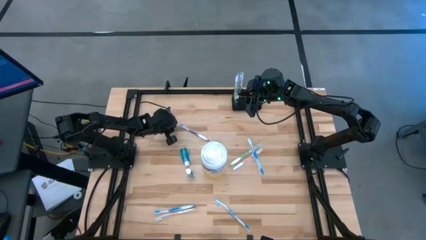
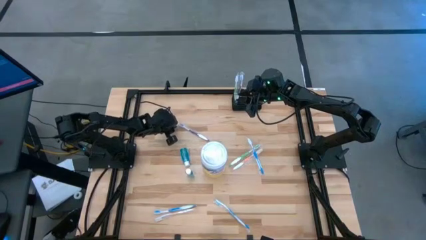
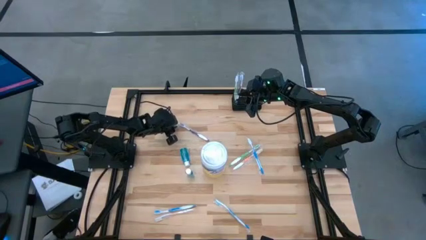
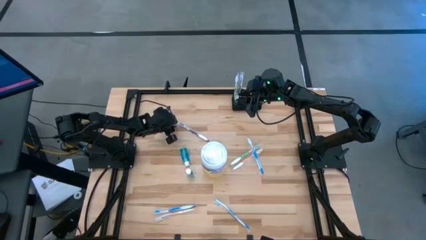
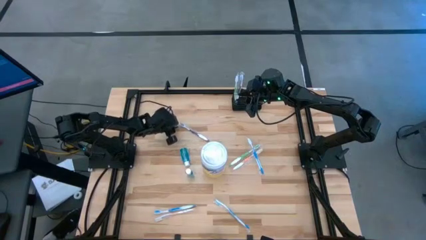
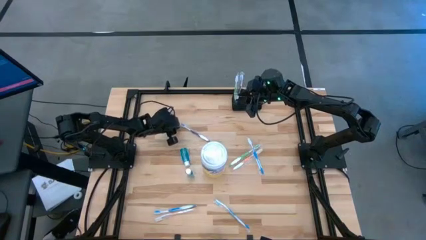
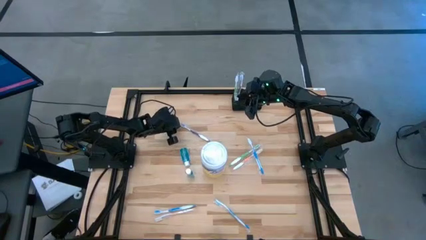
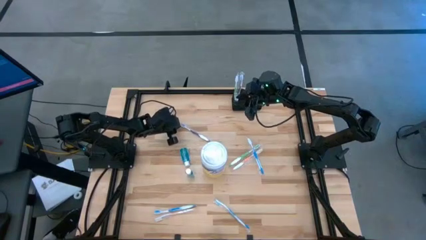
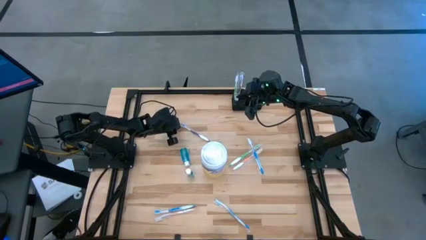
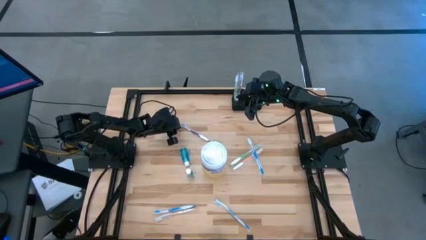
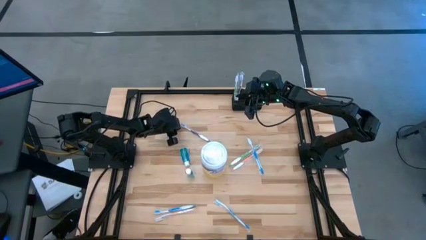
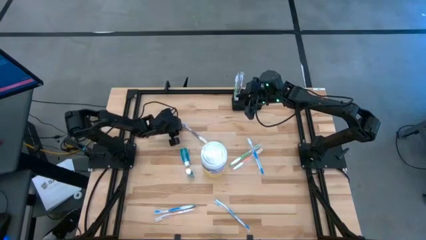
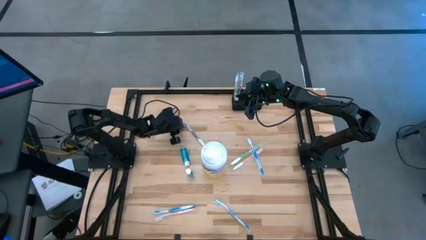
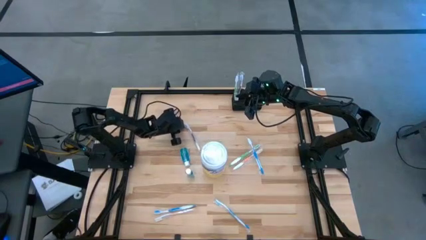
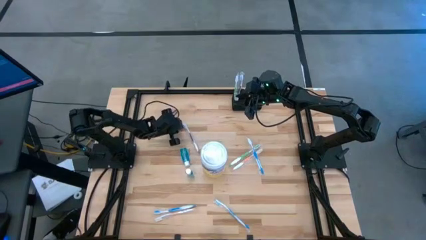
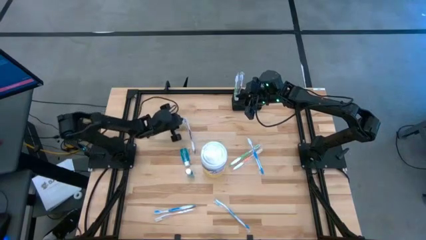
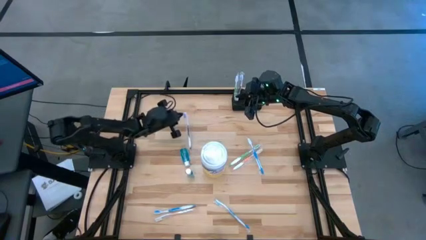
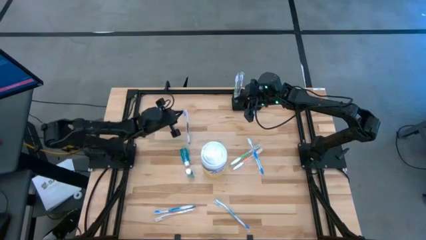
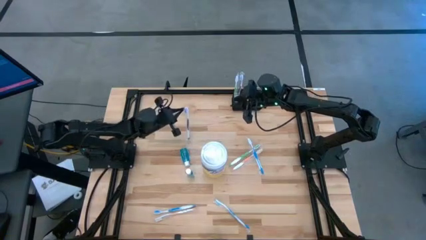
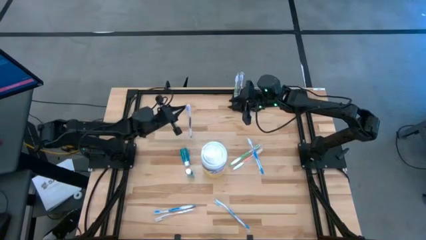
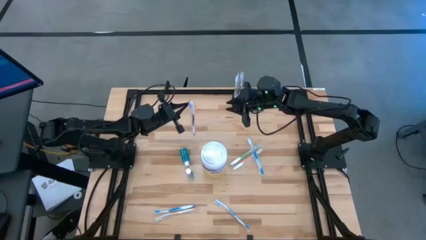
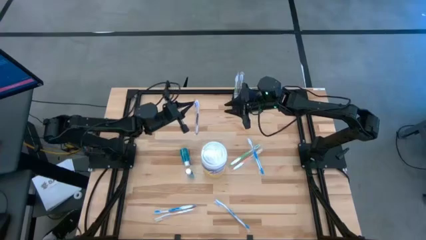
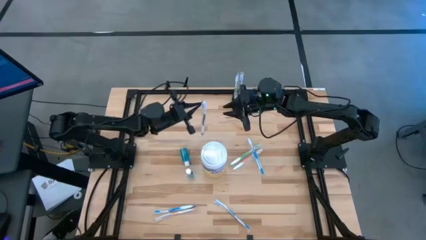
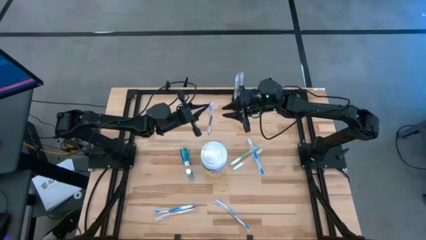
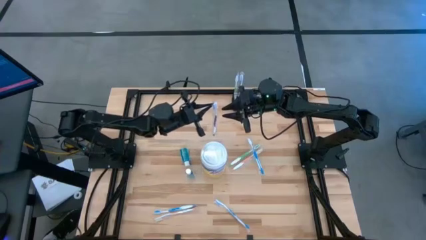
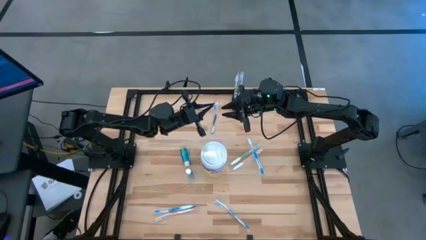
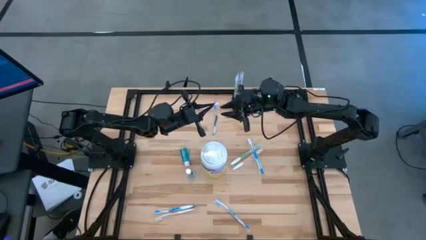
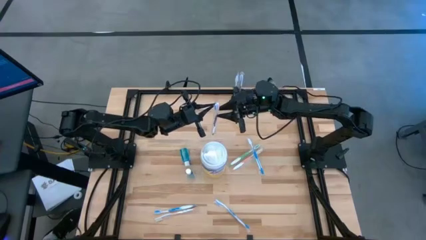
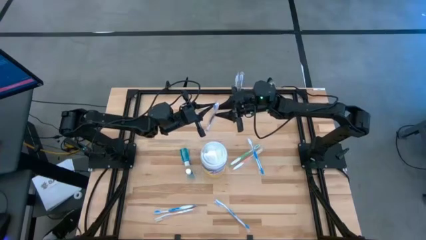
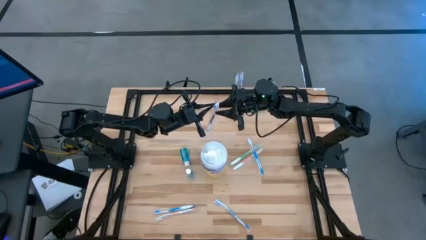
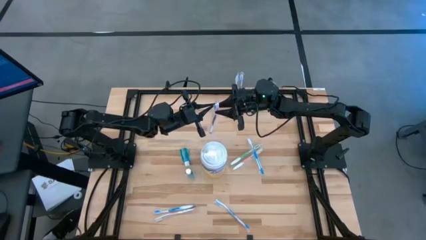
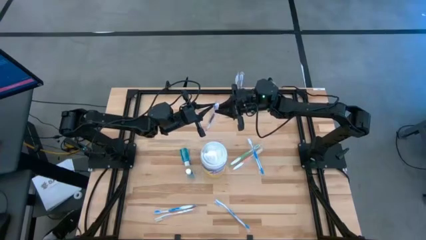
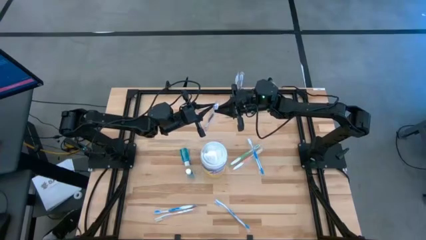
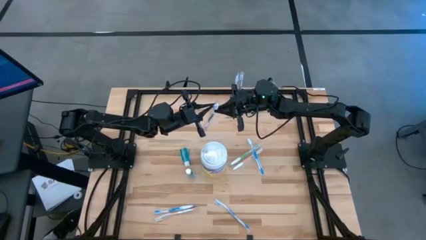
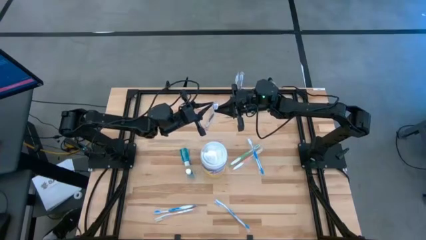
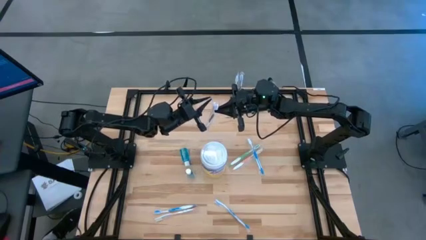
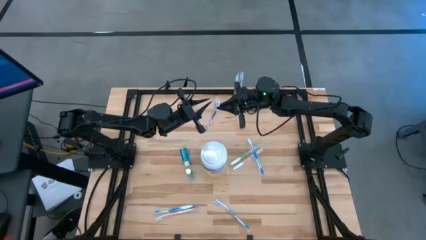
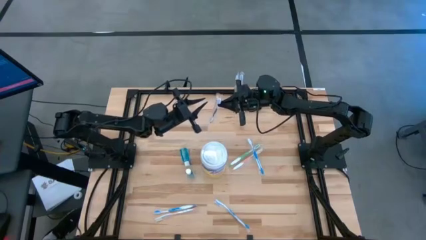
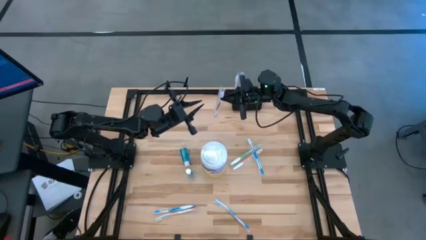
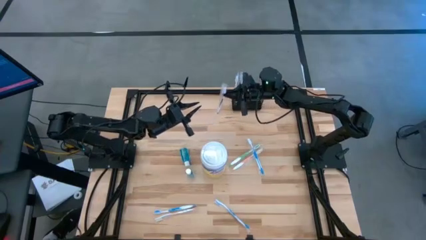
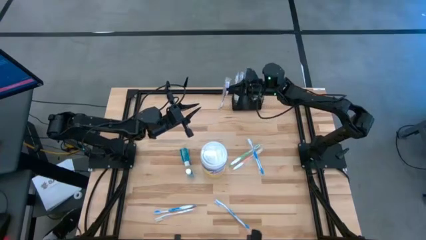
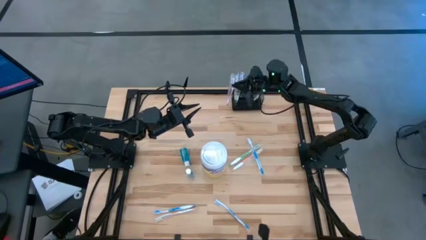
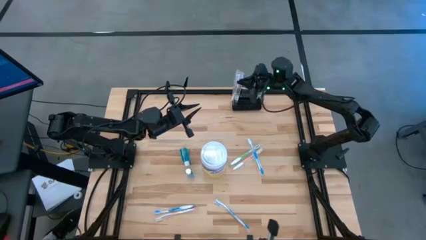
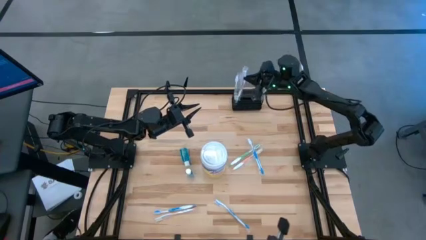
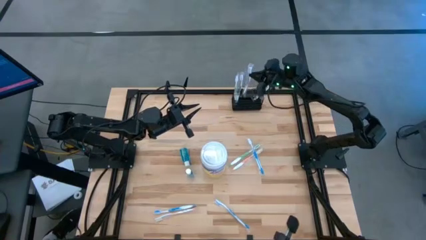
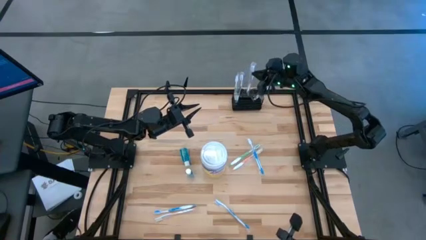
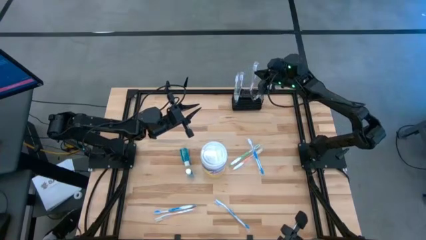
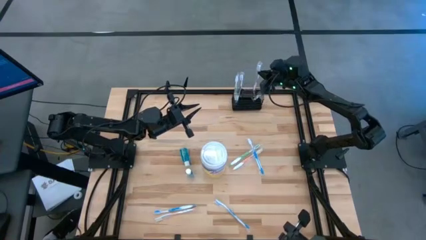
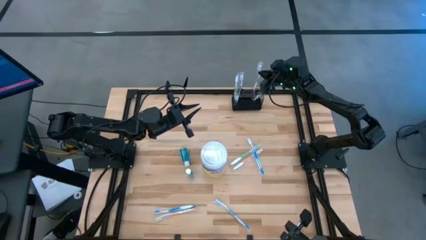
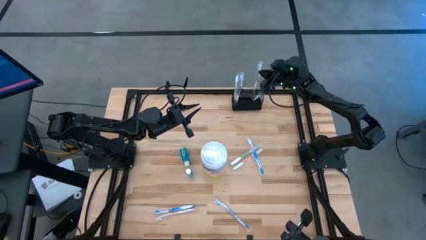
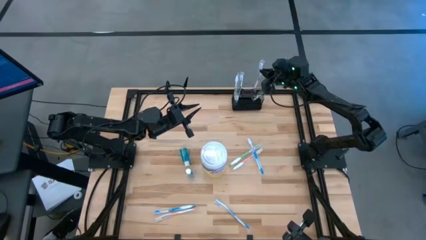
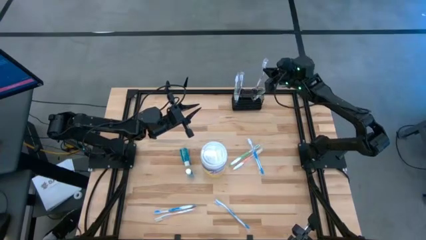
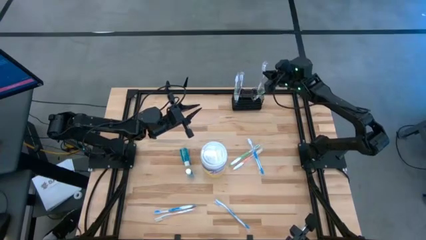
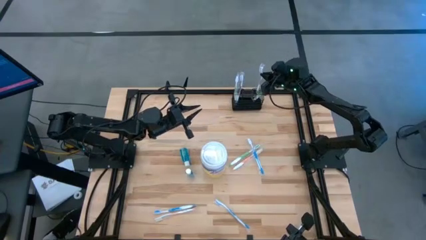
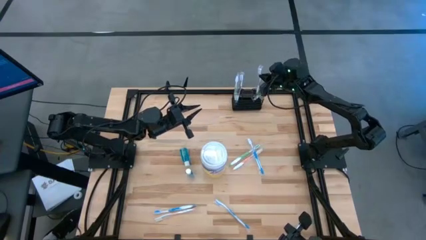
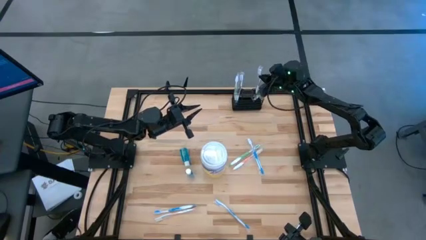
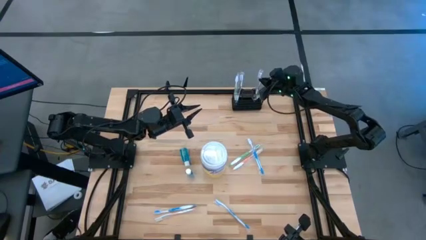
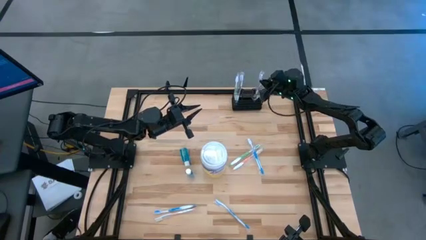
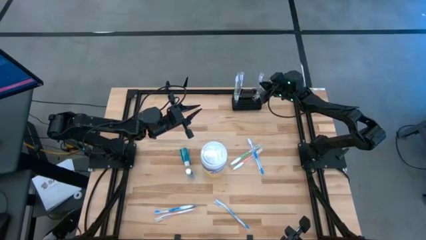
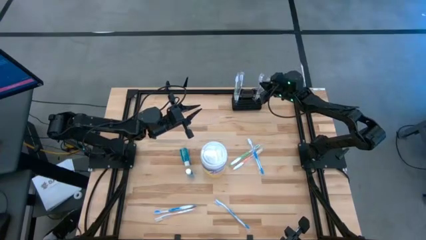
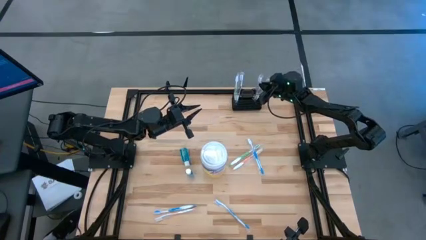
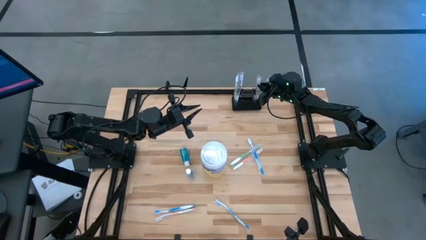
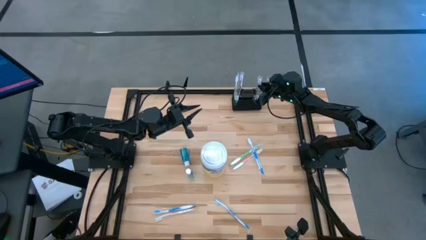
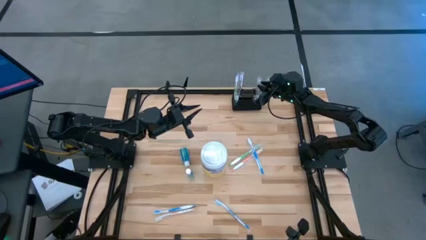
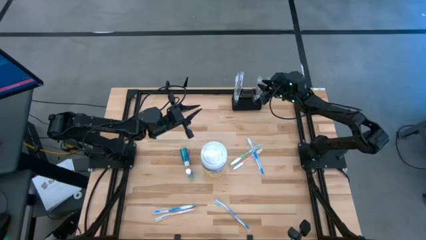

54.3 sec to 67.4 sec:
Task: Pick & Place toothbrushing station
Put the purple toothbrush into the black mesh organizer
